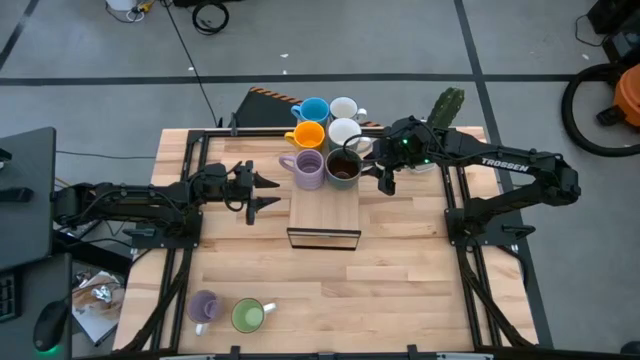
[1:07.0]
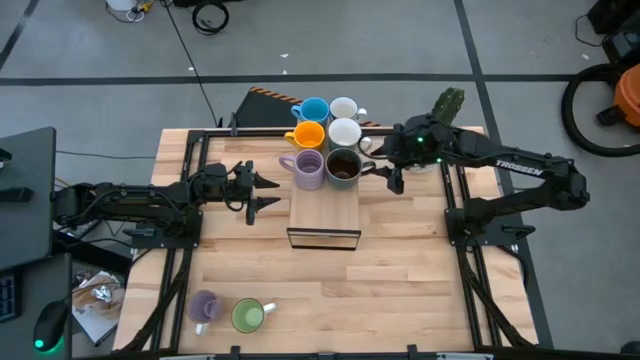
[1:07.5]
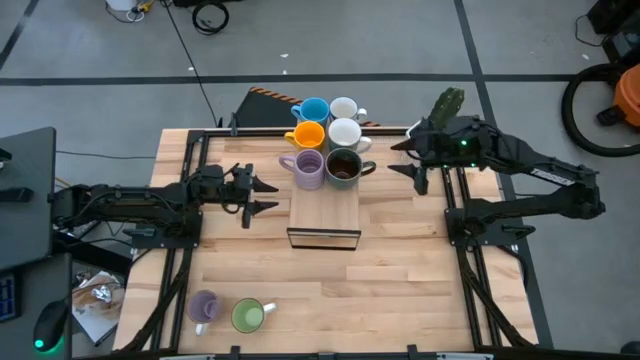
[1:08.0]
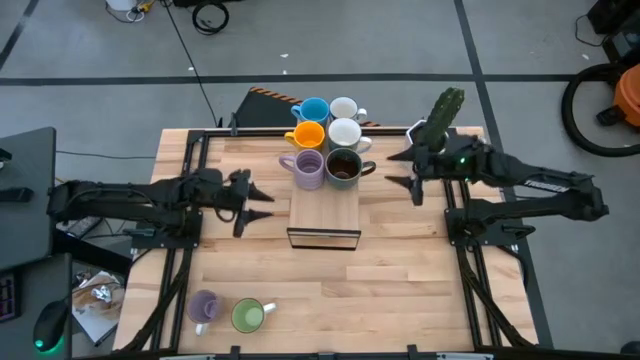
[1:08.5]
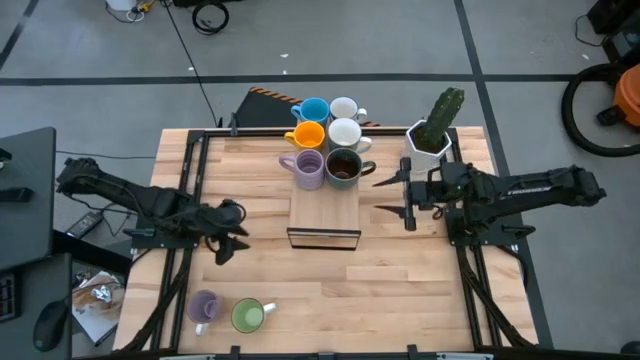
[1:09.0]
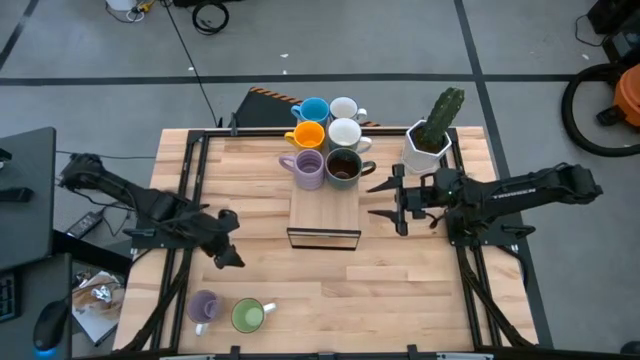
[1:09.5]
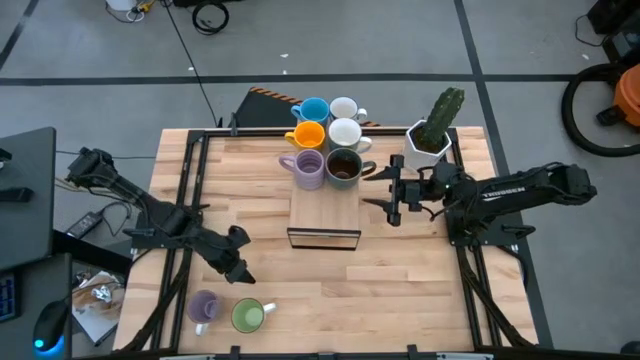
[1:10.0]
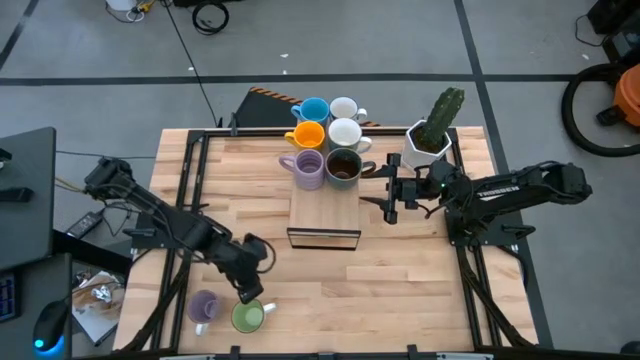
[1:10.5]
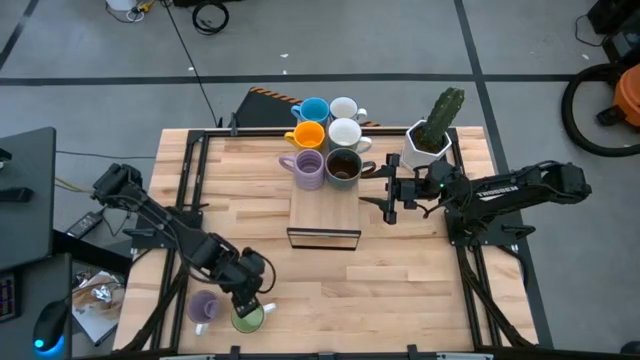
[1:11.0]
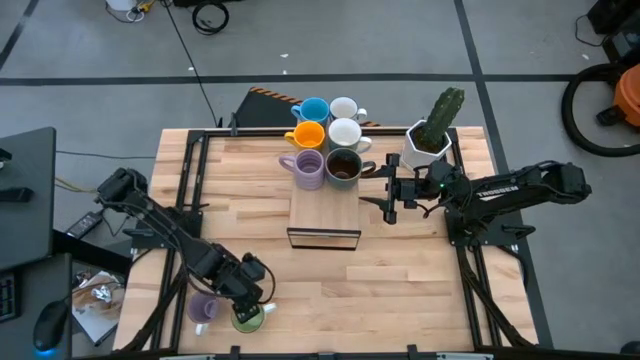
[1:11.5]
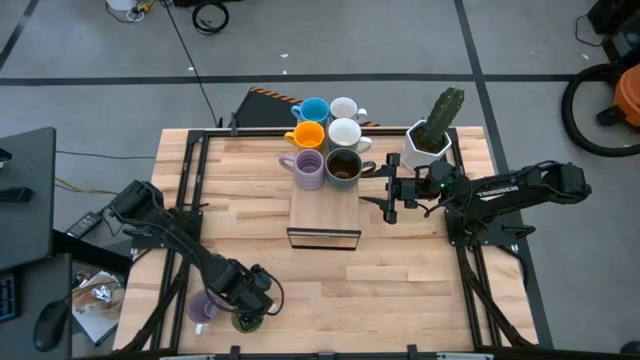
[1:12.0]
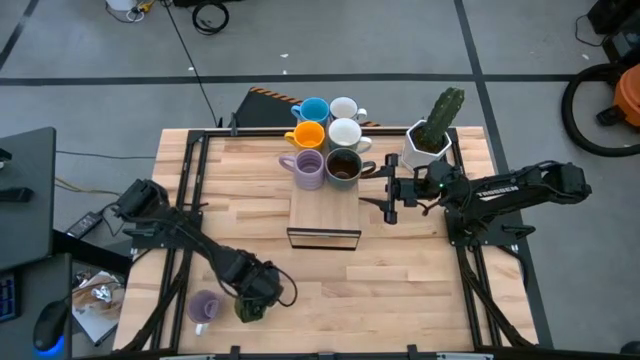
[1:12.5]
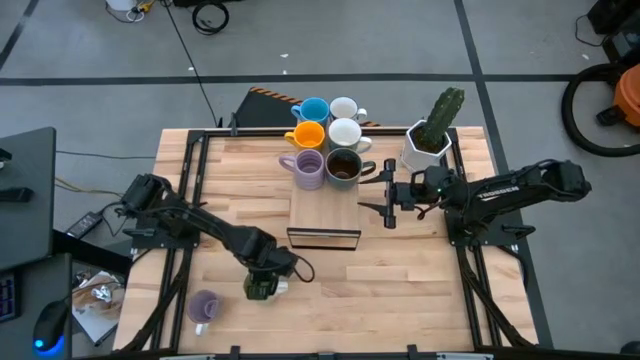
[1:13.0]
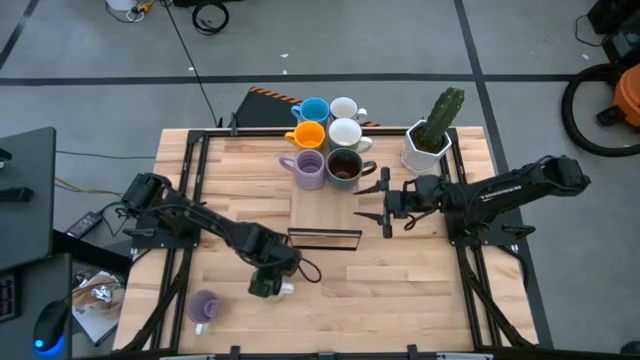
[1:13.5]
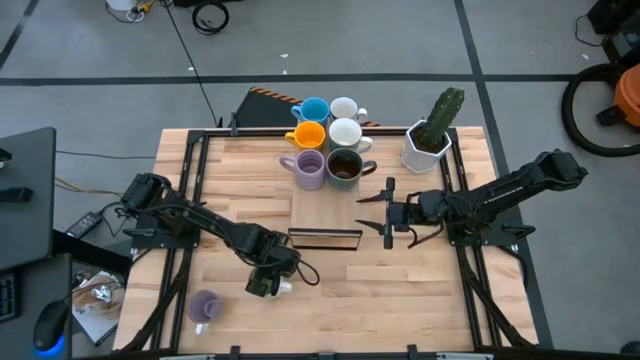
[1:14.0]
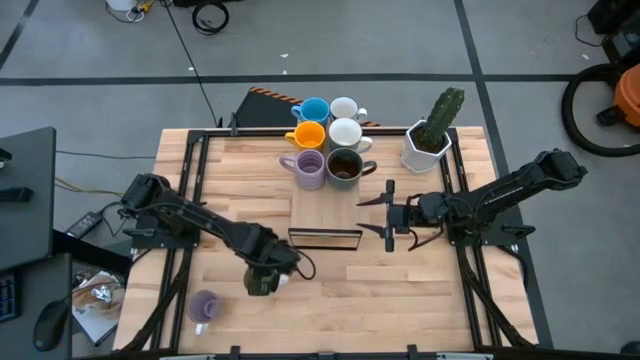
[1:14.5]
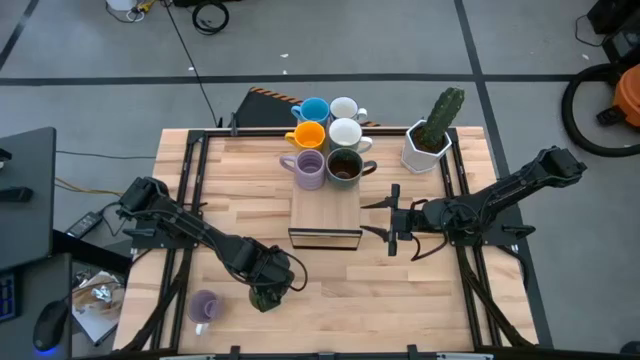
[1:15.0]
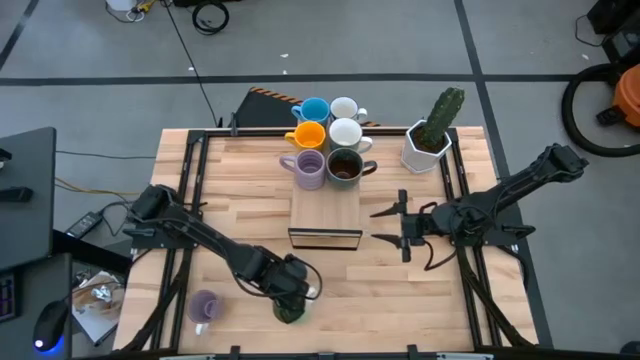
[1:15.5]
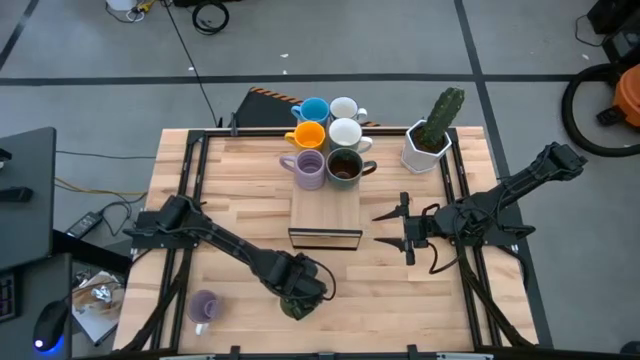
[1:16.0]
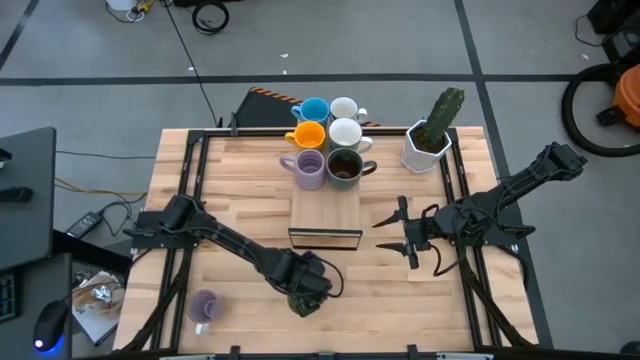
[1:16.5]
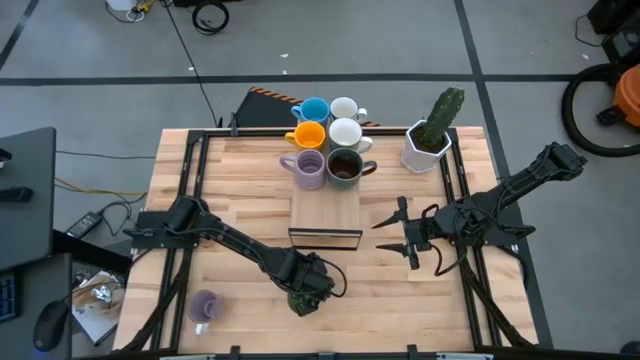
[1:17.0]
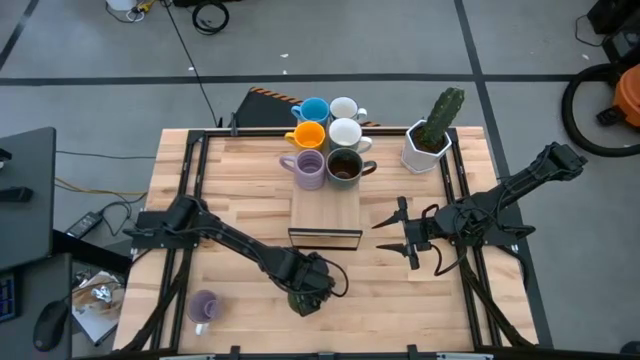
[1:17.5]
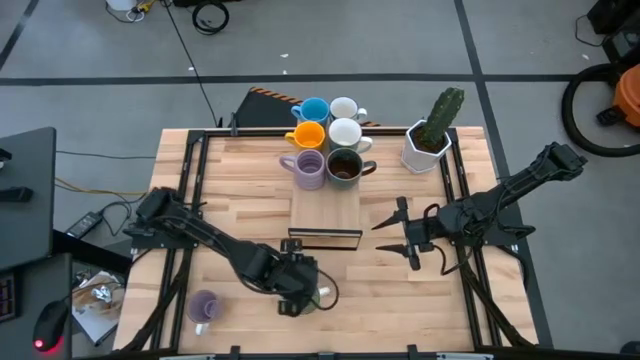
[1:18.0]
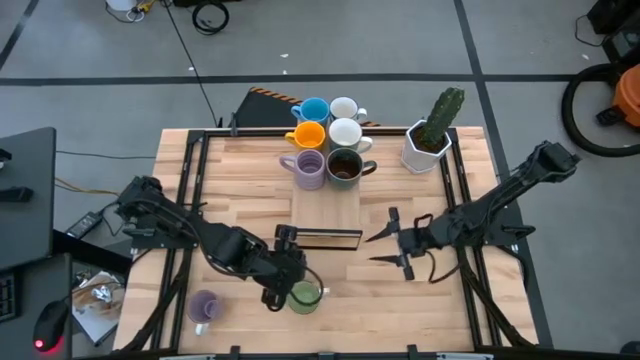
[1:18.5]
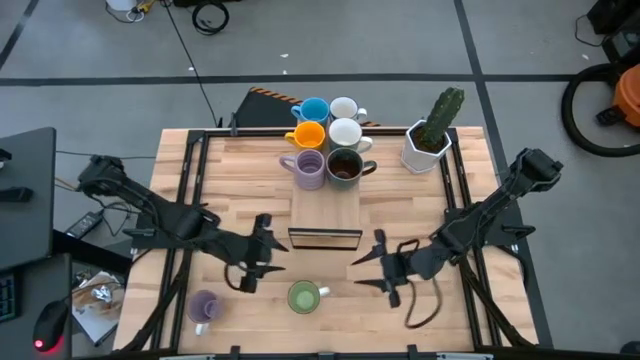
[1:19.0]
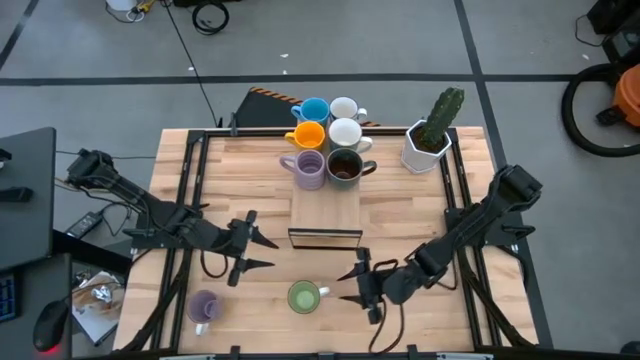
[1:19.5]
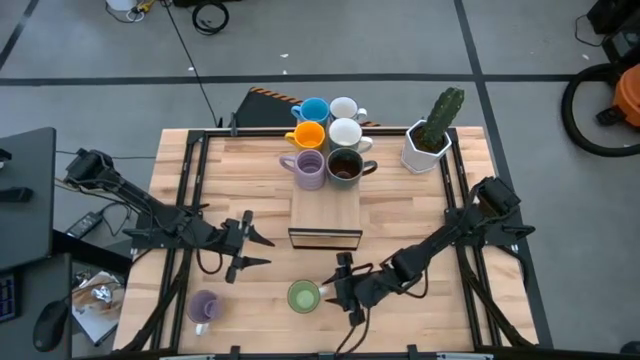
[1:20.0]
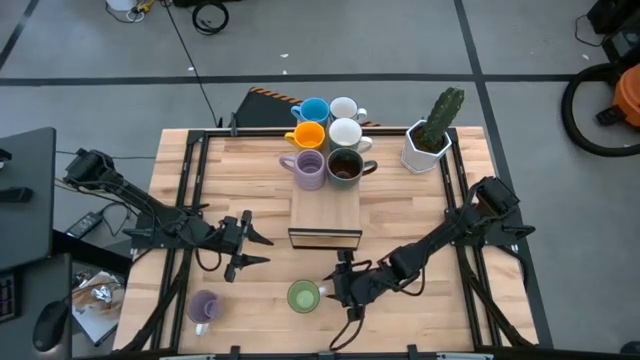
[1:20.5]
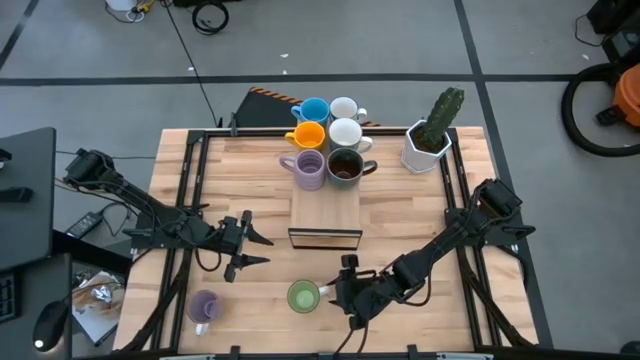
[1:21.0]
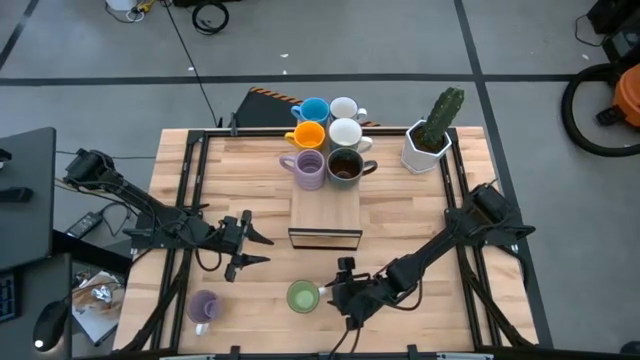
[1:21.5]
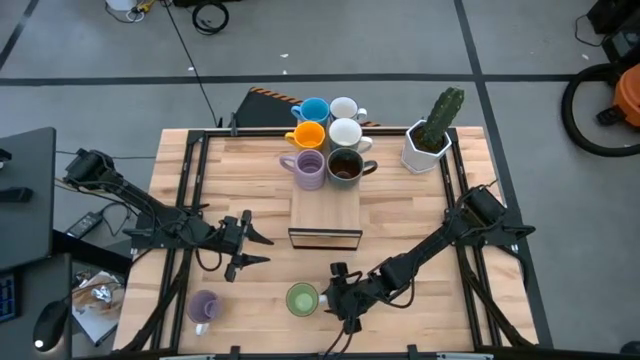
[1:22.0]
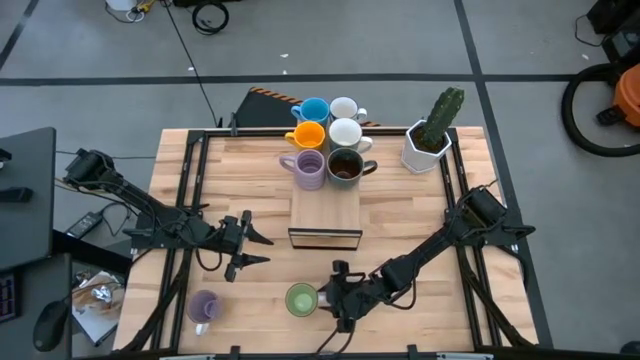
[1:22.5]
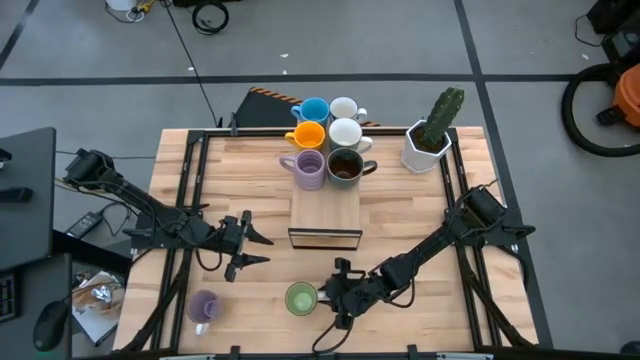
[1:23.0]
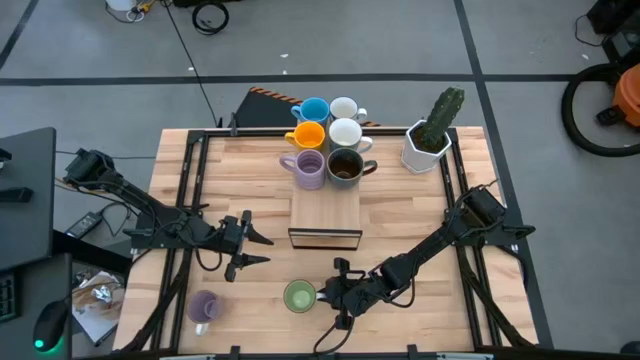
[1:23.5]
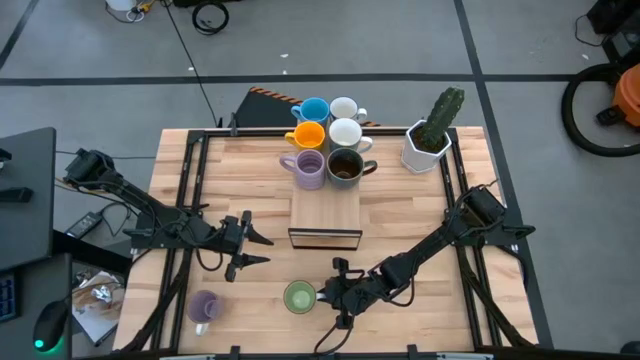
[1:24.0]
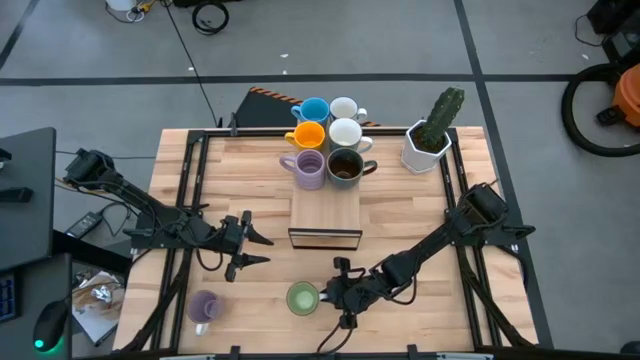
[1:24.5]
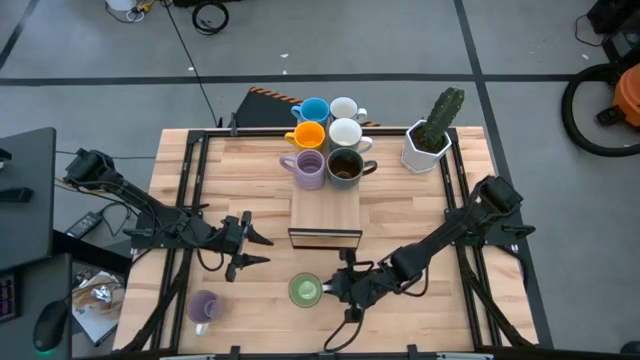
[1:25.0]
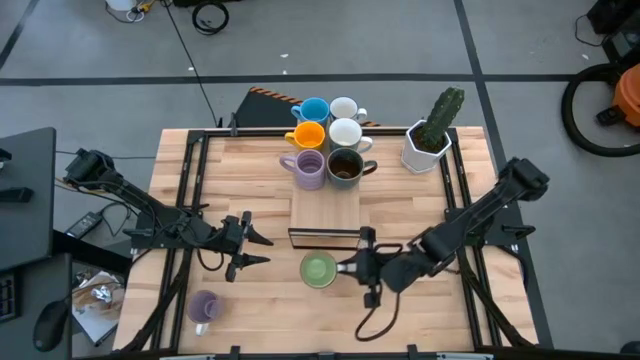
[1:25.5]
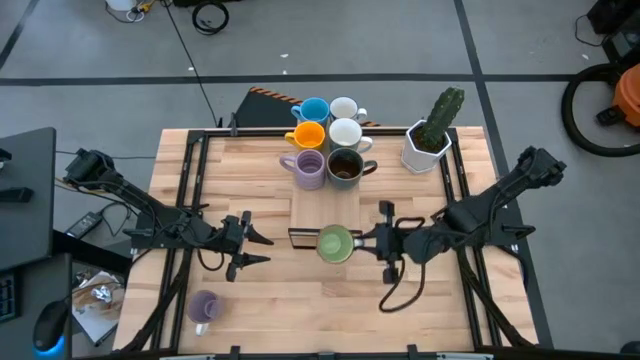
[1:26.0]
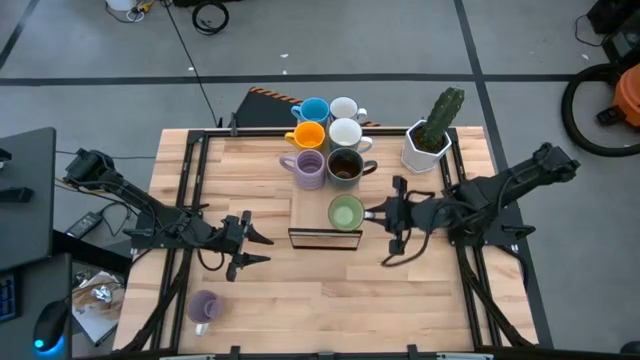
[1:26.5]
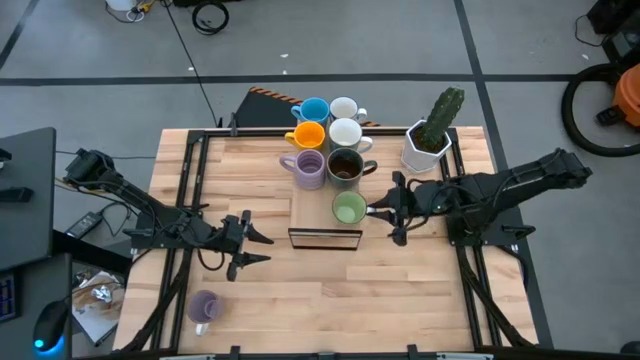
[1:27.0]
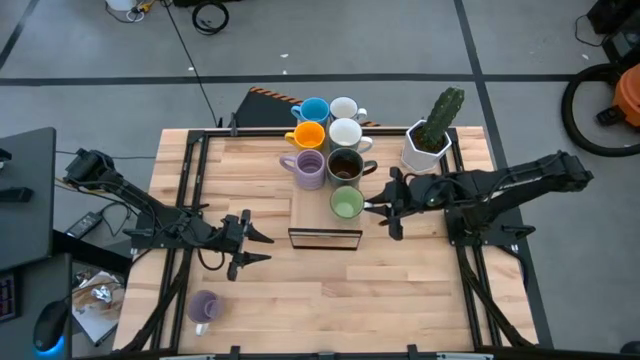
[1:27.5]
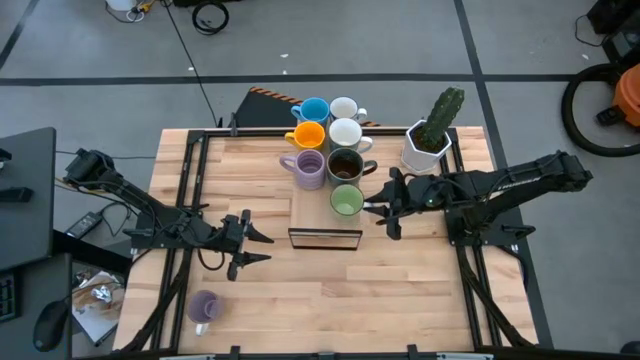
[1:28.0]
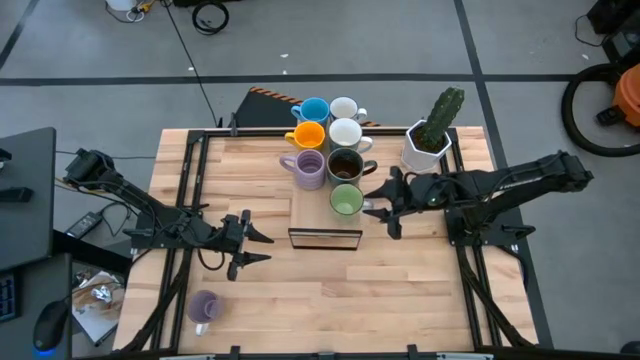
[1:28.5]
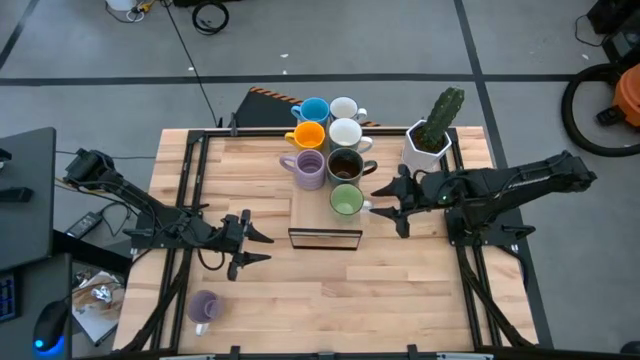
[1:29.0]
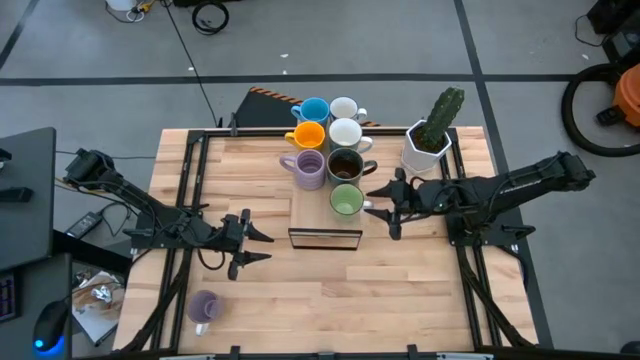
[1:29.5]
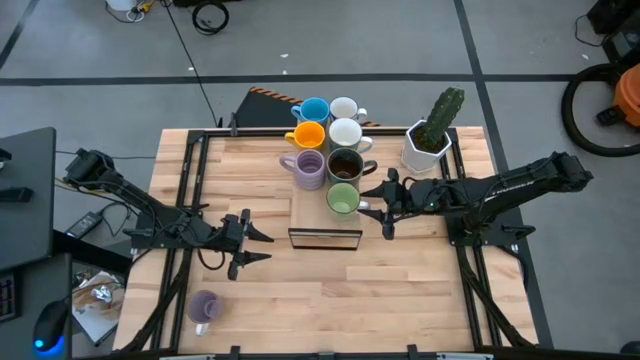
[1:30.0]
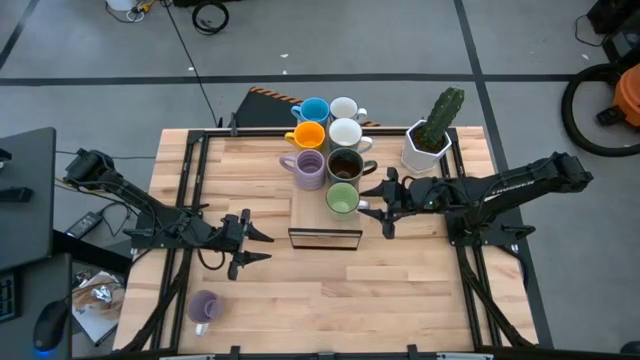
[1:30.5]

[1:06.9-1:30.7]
Task: Place coffee mugs
Put the green mug on the shelf
